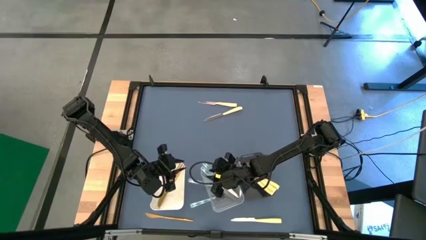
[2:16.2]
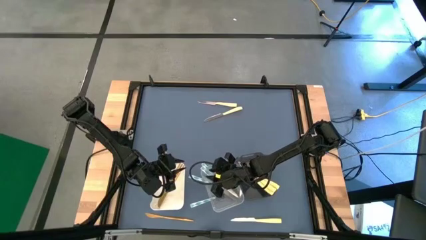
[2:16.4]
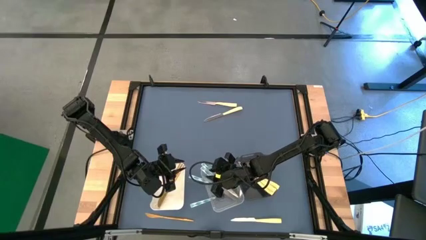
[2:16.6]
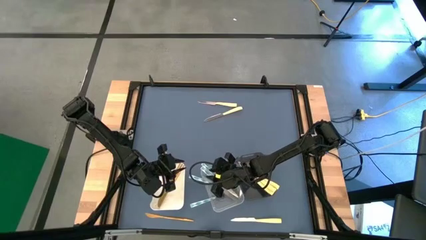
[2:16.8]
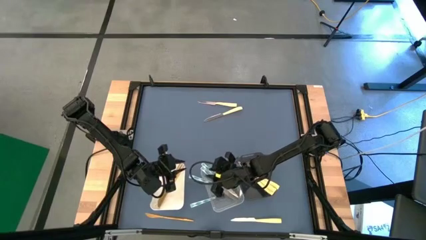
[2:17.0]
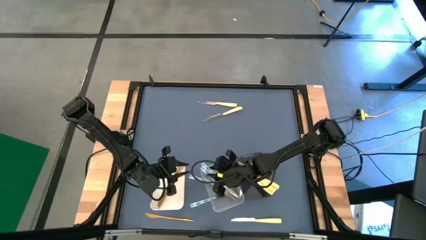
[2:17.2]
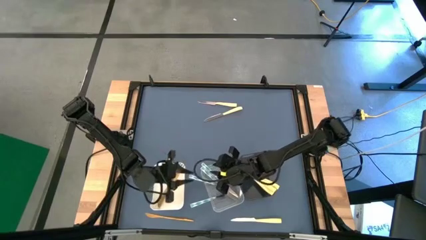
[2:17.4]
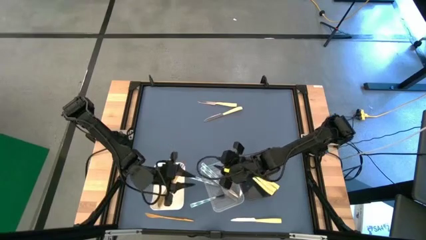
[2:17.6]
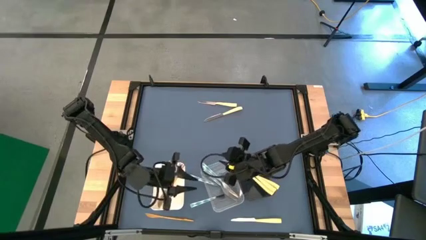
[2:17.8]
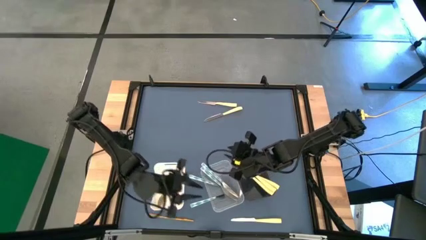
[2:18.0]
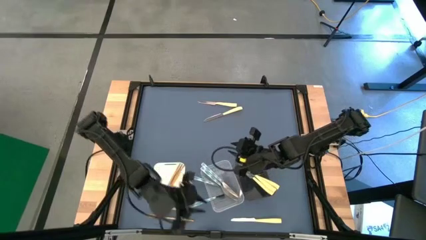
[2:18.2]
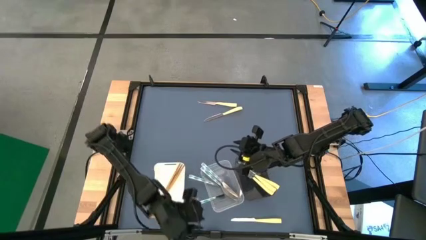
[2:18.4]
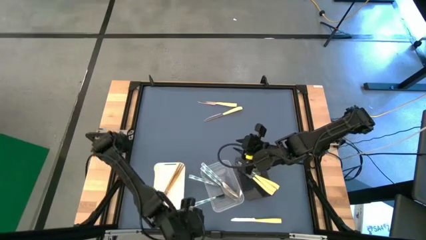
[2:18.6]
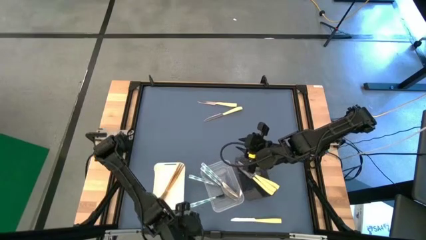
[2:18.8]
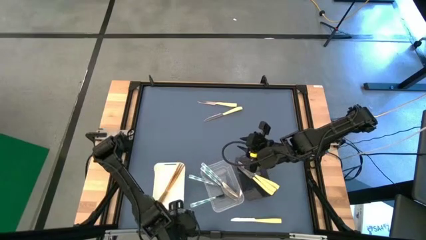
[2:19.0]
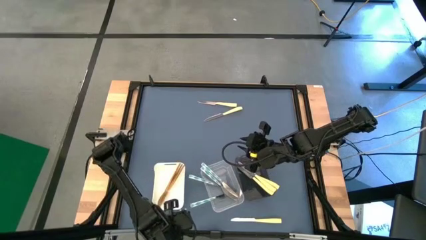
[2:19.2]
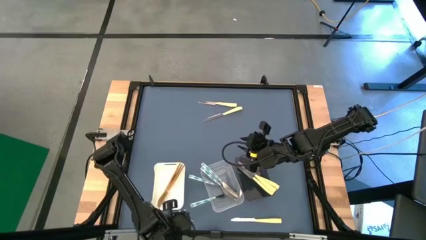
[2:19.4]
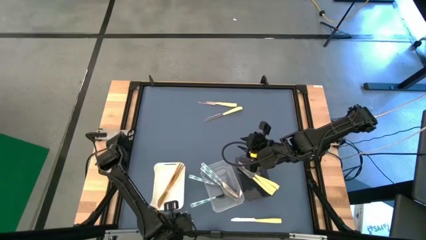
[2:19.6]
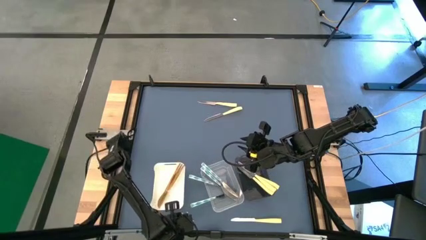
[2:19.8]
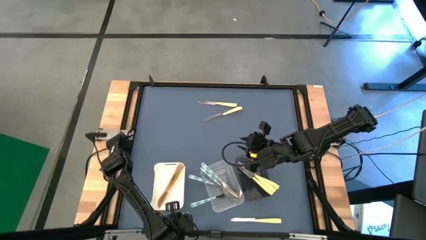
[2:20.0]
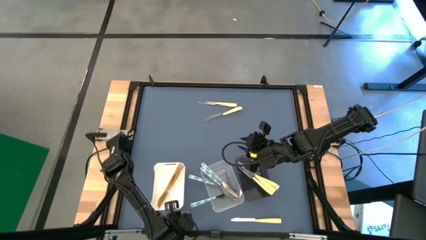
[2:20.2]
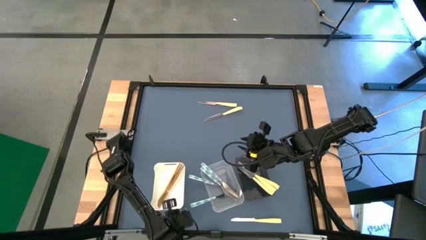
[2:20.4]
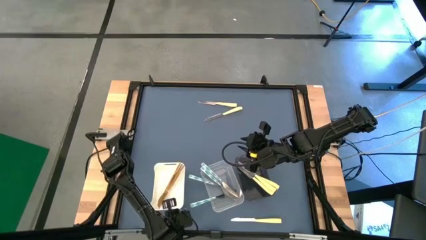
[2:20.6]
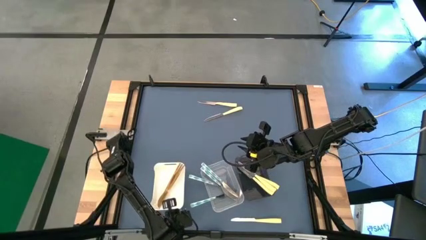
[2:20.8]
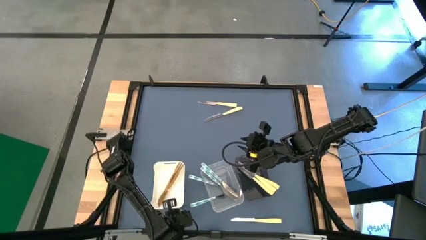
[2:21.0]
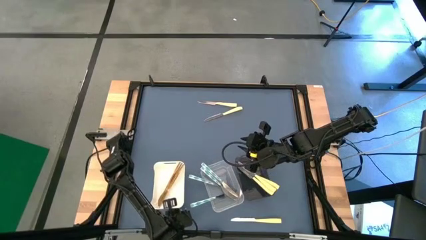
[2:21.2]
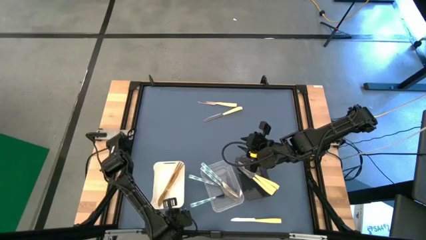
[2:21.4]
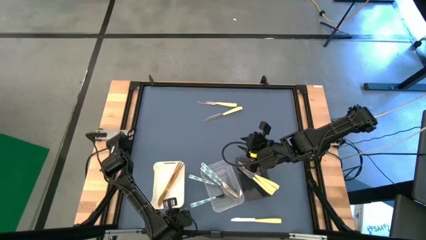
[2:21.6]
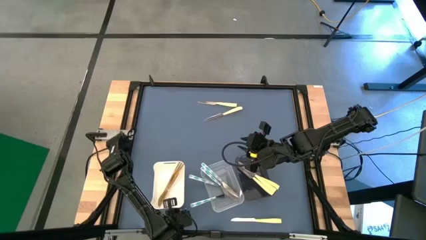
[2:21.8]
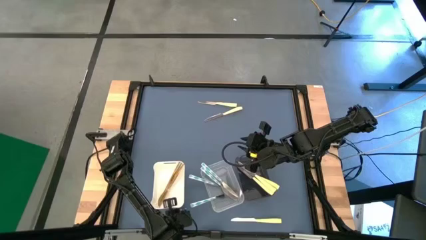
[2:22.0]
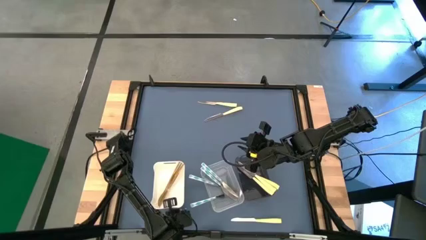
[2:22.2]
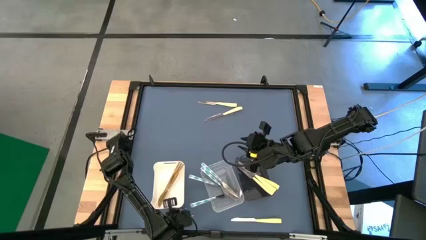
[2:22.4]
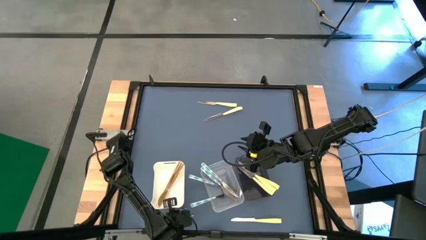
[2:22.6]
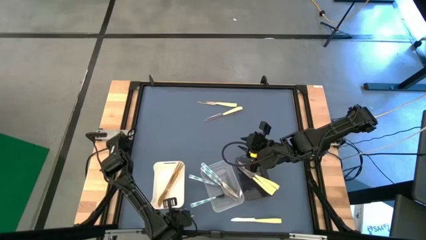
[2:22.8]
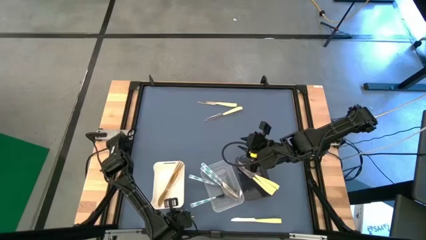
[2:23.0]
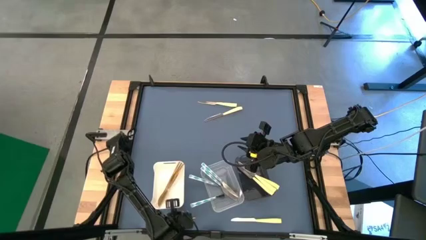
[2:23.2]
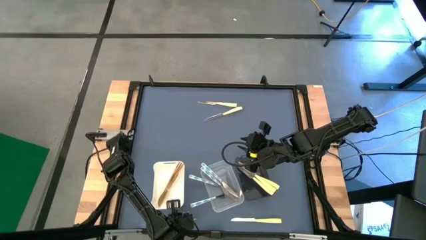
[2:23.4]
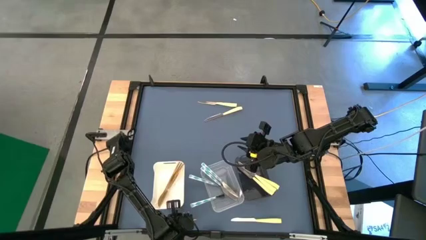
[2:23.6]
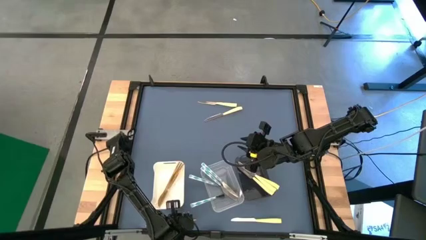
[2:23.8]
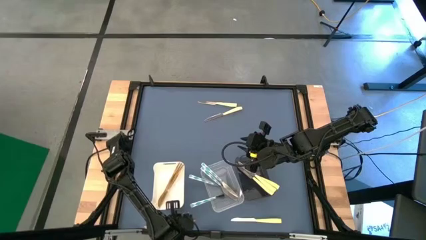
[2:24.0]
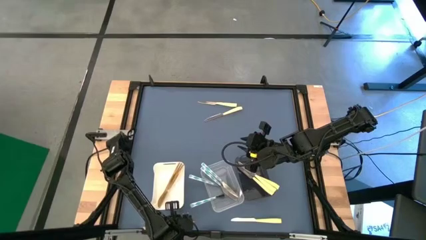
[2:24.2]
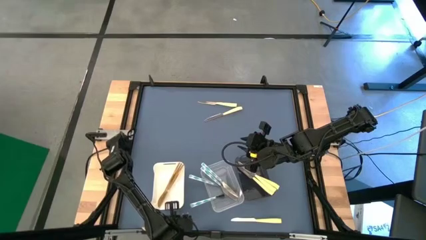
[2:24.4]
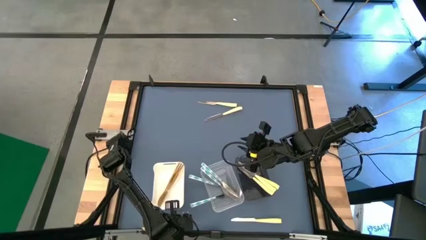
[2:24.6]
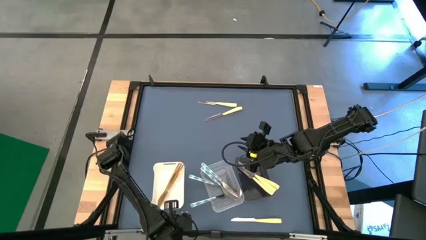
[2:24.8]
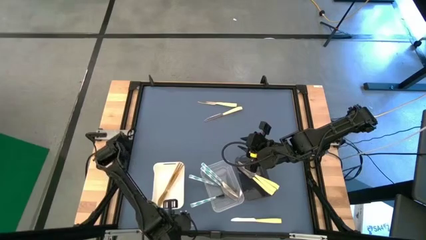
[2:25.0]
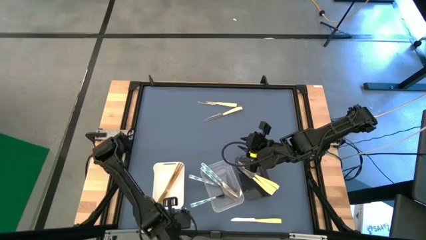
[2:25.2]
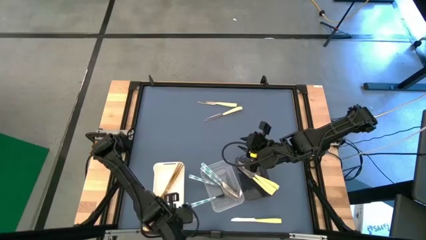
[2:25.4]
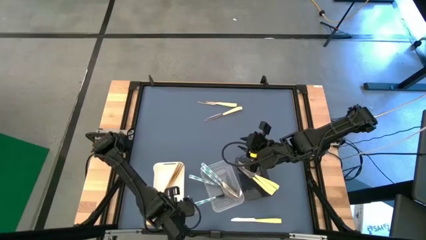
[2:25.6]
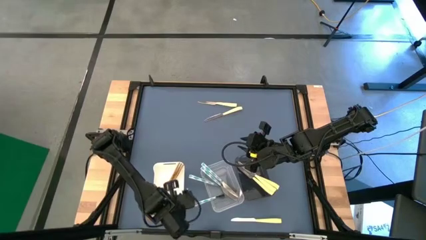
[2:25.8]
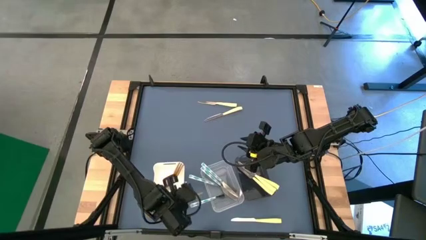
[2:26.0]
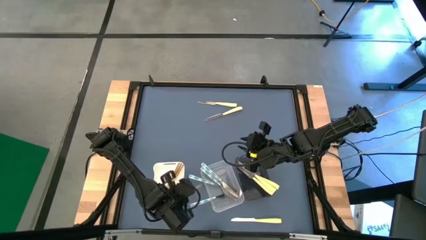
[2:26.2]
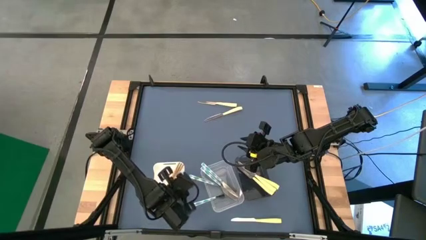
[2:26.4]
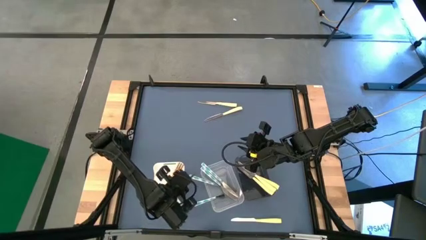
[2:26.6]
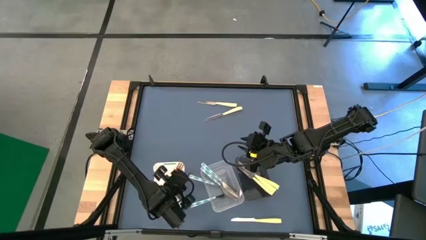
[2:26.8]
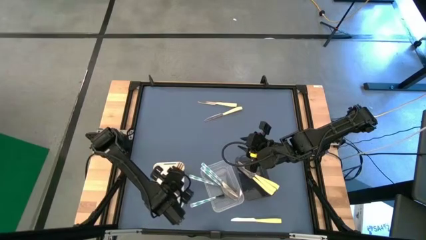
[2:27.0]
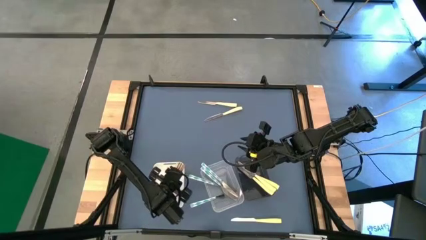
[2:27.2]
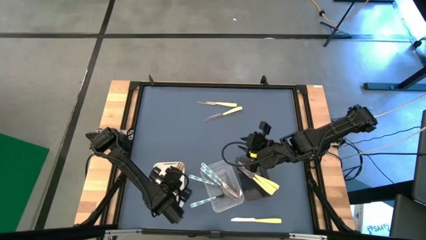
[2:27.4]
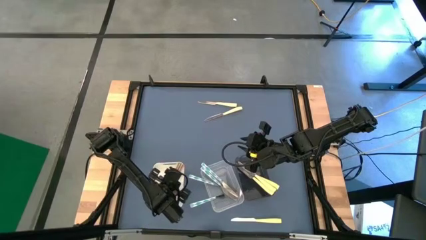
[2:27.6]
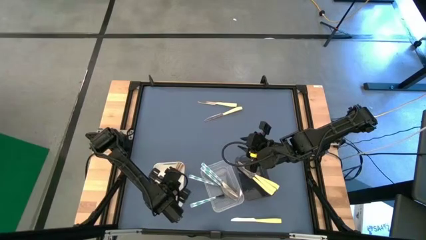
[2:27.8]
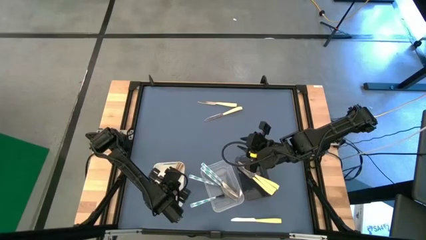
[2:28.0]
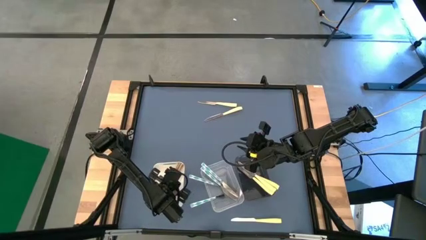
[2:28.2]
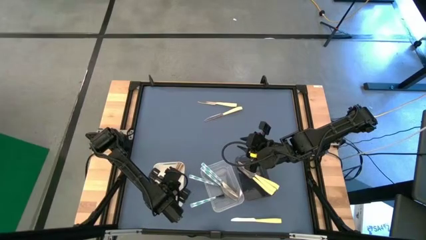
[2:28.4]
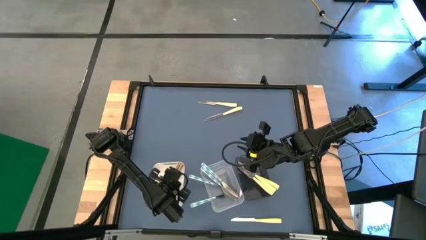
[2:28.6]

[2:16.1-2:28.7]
Task: Sort silverware by color (type)
Put the gold table knife into the white bin

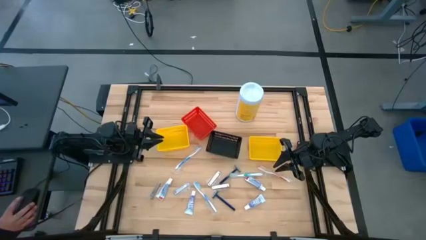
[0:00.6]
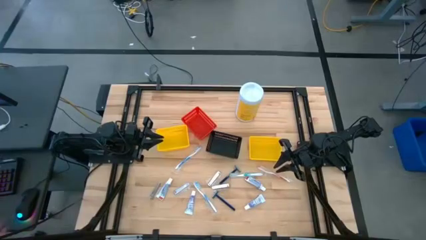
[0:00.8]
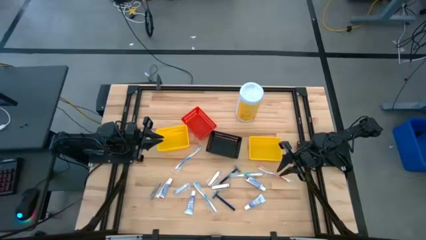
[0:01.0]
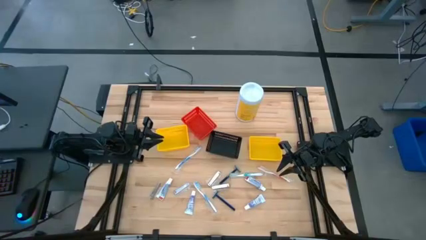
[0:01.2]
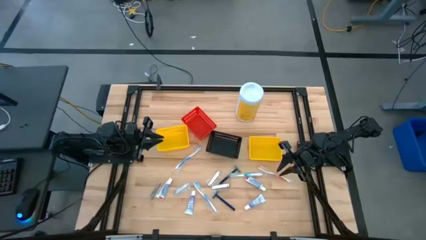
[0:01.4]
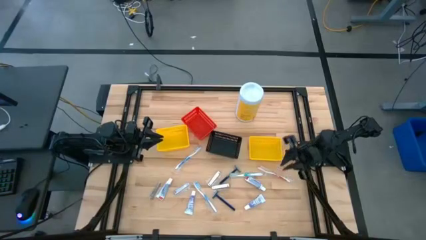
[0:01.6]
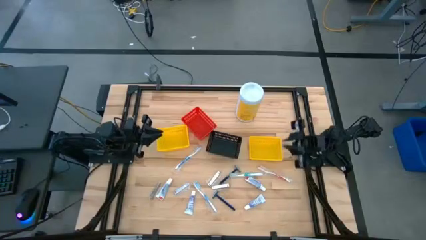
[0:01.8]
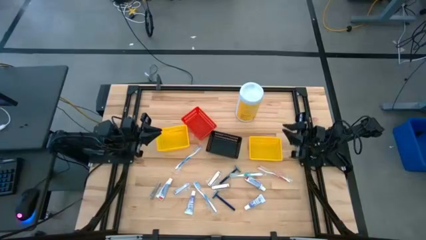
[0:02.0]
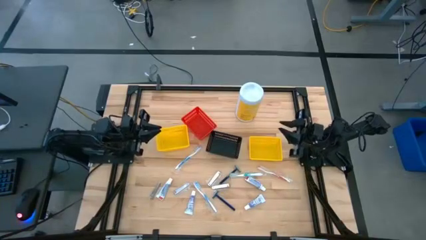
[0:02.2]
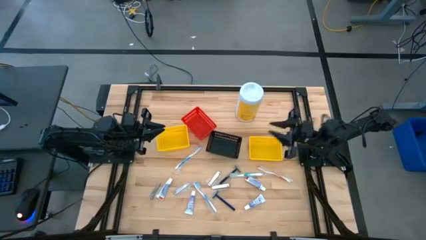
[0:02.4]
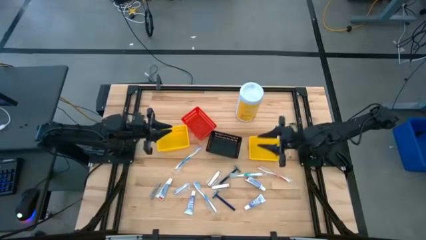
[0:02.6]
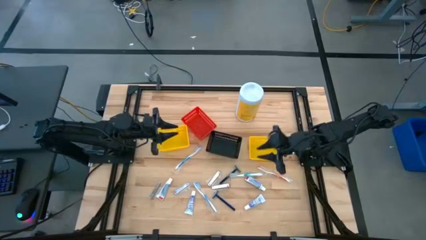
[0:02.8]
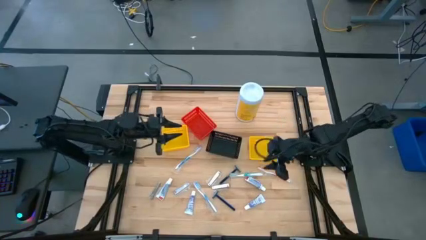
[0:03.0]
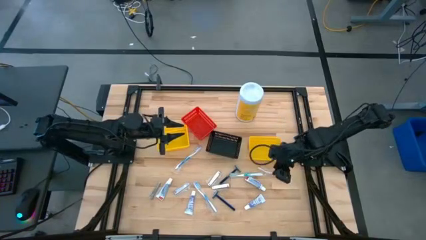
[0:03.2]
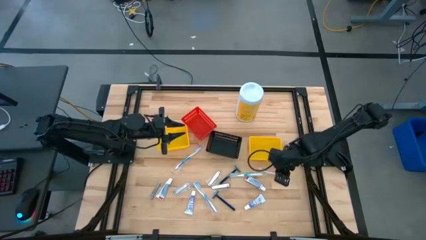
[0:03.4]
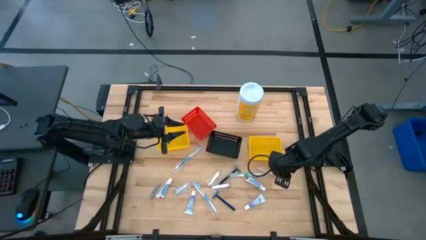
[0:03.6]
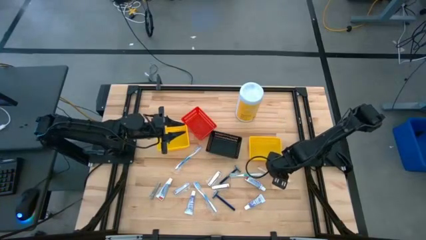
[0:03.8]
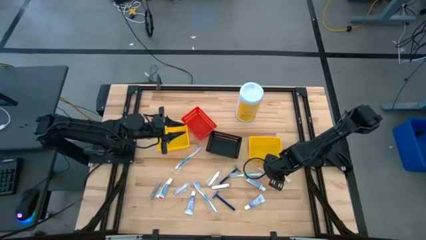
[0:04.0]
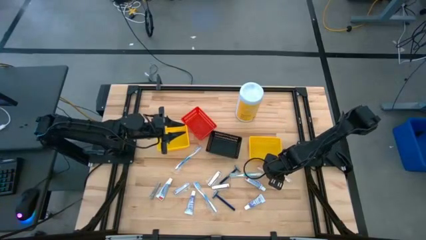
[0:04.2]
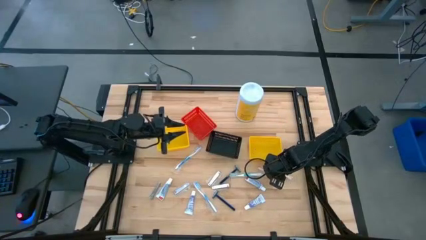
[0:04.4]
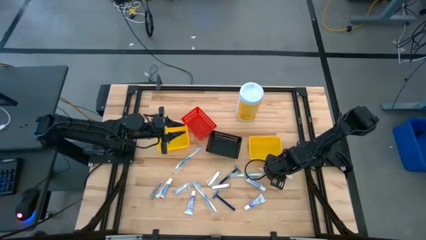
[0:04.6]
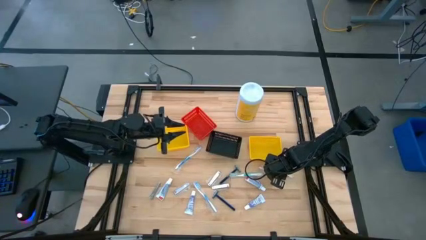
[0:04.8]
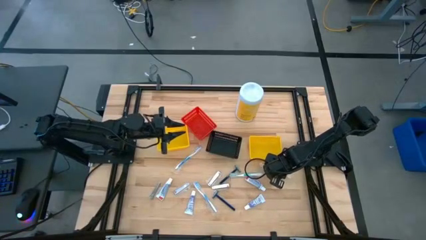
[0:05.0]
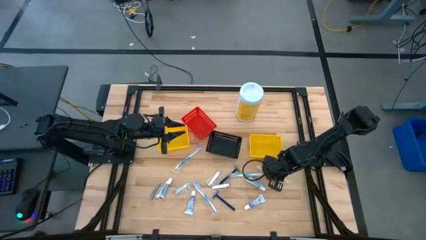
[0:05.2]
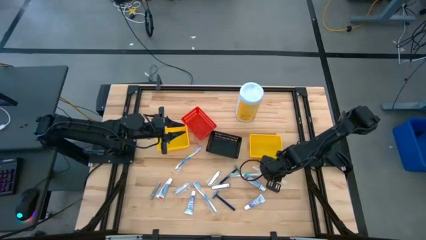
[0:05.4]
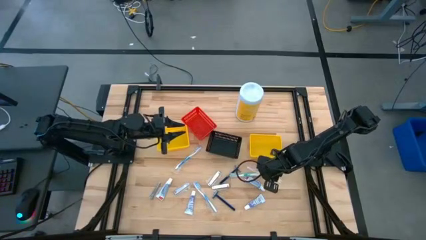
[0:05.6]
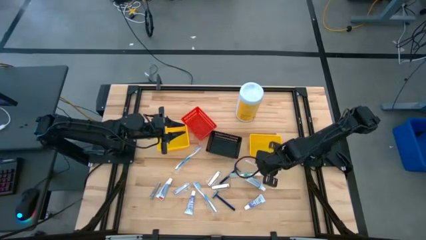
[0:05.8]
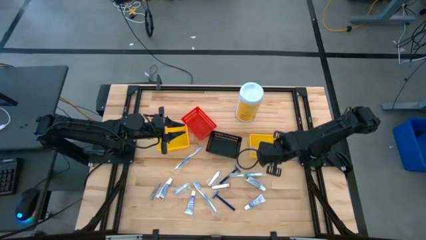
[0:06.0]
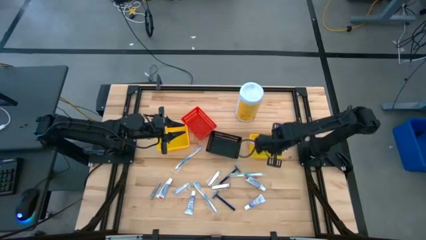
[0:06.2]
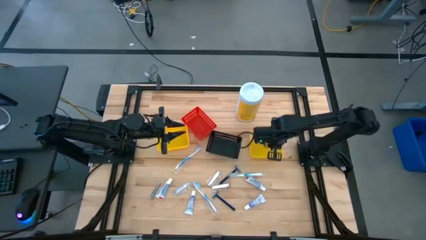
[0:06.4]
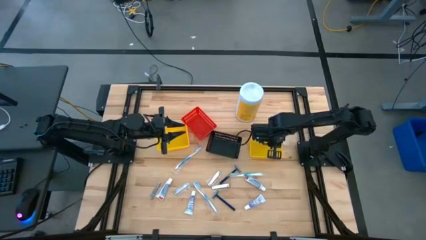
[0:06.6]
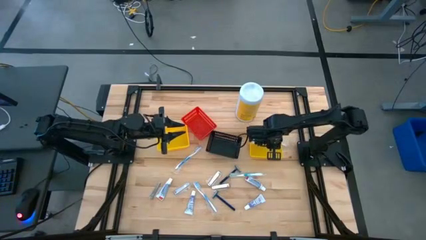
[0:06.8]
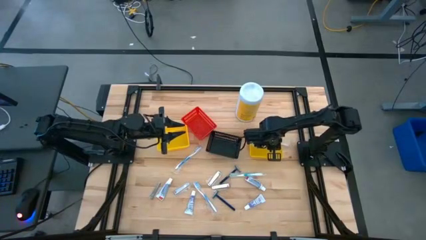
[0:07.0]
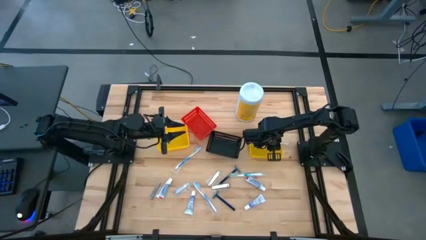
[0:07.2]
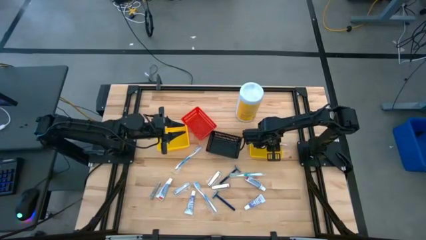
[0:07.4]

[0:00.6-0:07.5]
Task: Pick & Place Travel size toiletries
Put the toothbrush into the right yellow bin
